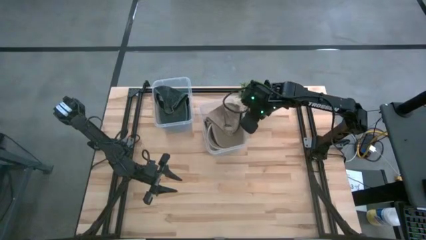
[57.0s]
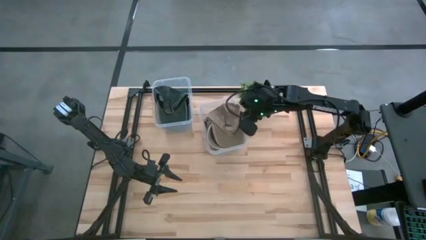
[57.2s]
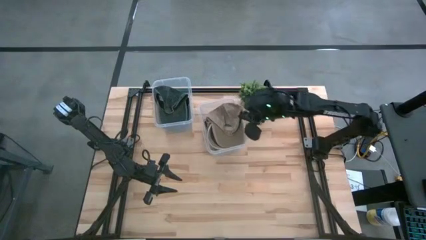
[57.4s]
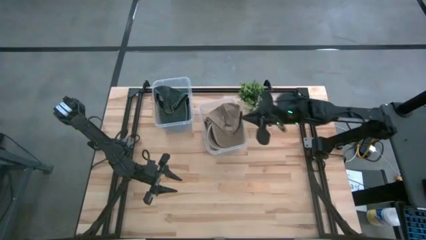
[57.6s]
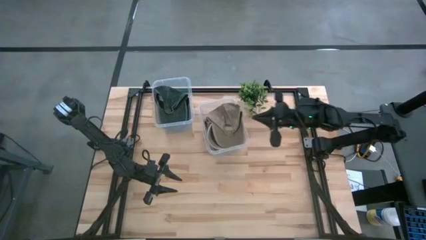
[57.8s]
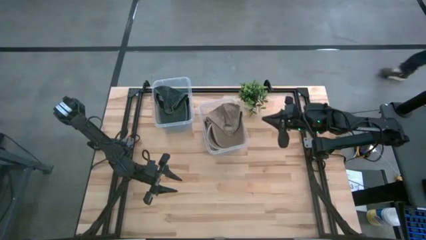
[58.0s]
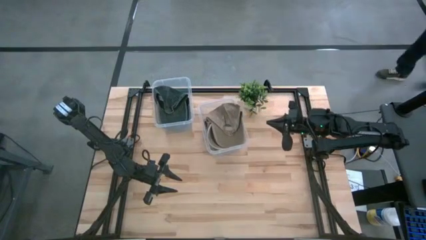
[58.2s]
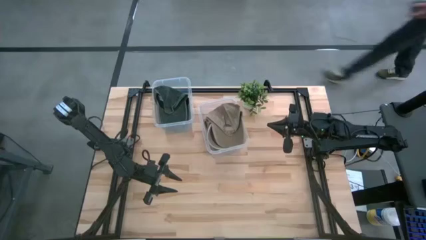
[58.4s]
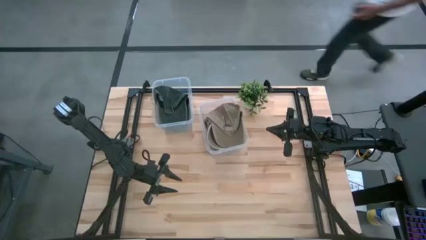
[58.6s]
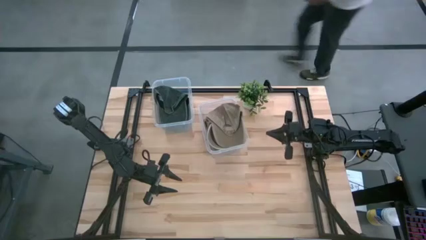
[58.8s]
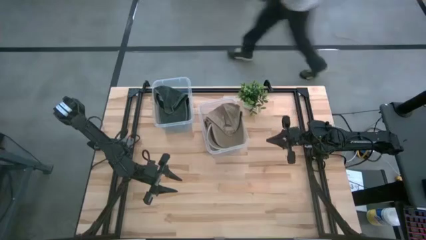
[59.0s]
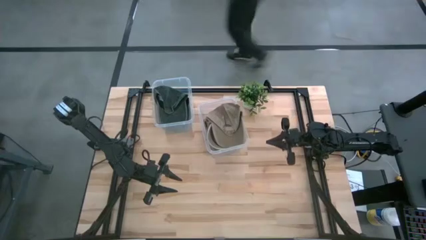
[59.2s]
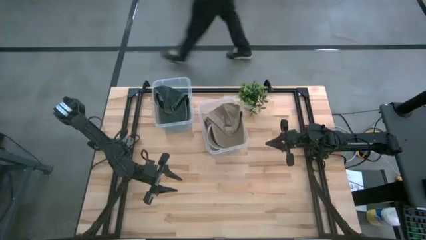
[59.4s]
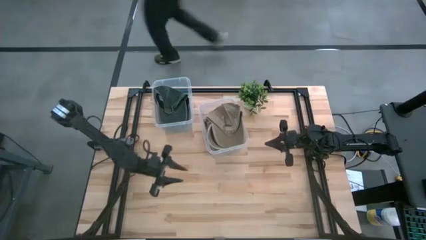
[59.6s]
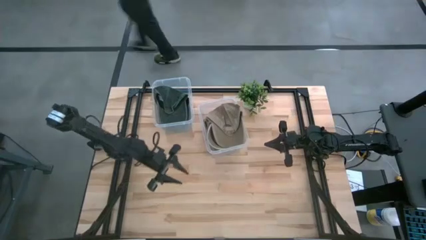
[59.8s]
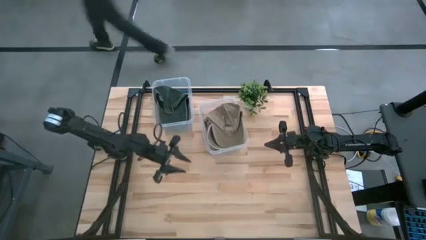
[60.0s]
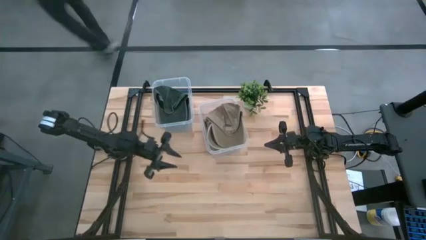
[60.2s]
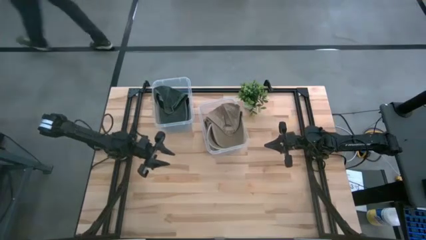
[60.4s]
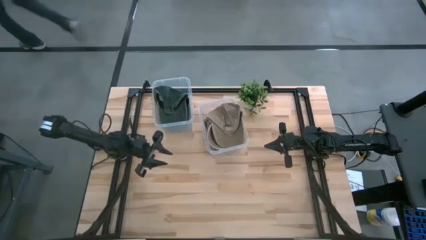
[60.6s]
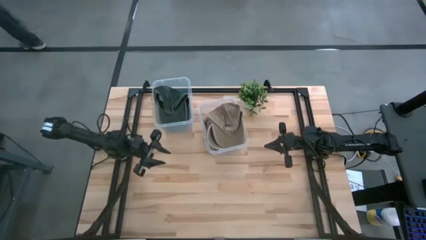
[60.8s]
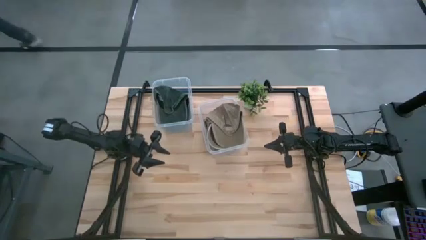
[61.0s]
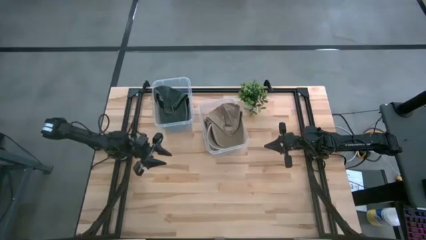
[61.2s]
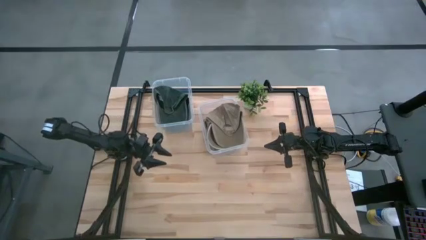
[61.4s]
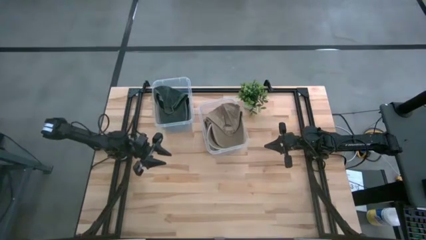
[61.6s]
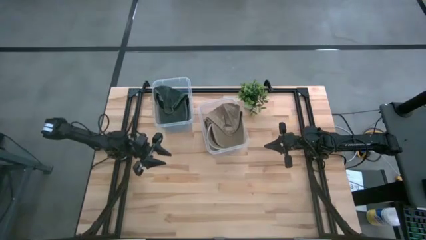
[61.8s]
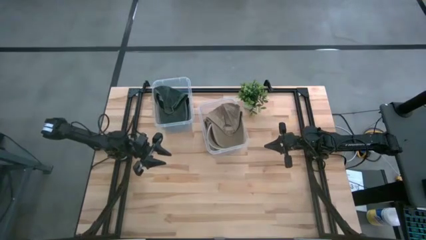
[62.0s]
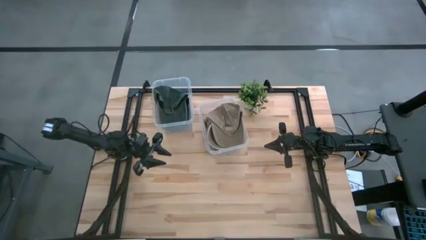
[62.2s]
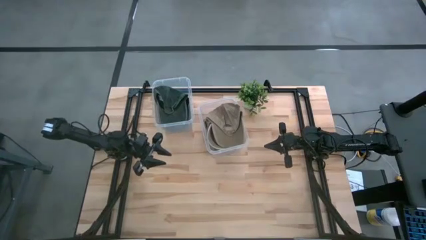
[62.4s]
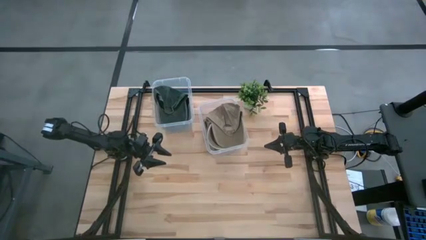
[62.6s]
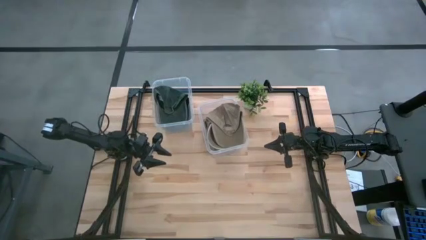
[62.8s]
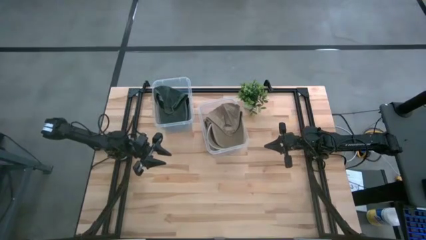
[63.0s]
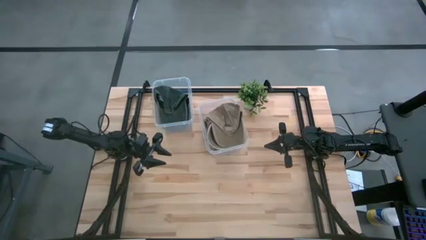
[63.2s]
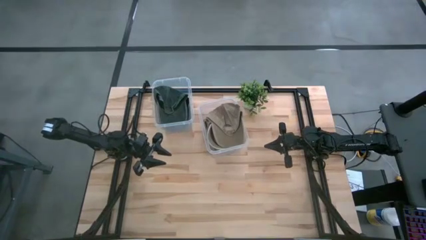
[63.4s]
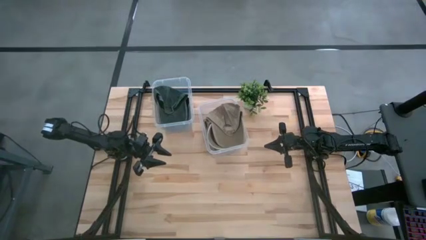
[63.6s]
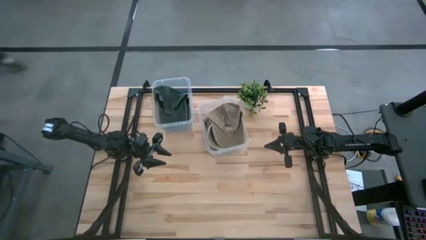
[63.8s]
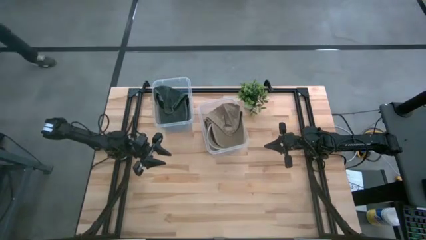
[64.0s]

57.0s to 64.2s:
Task: Pick & Place hat
Return to Home Position

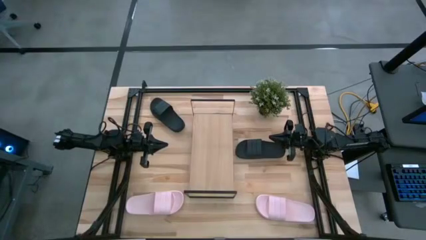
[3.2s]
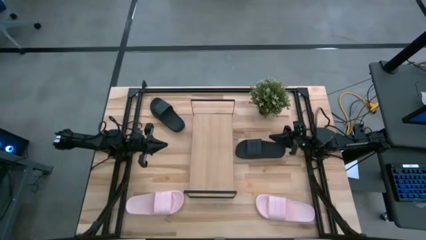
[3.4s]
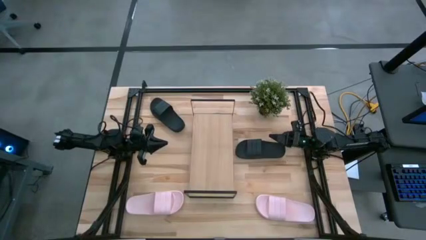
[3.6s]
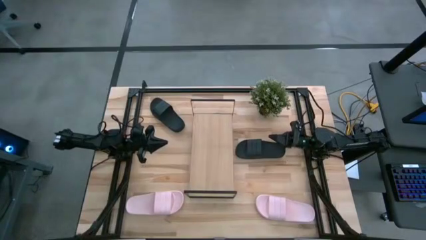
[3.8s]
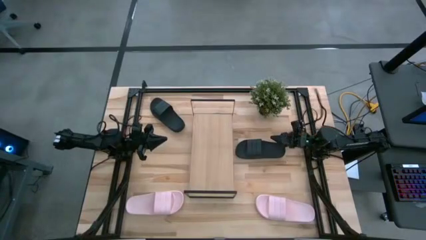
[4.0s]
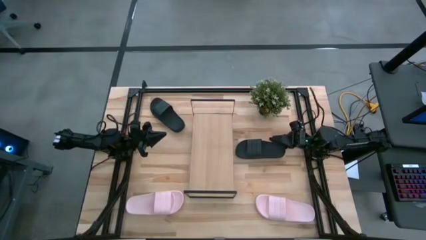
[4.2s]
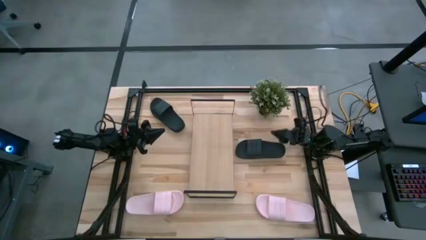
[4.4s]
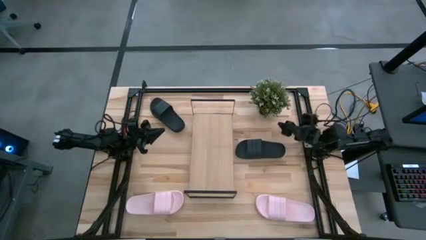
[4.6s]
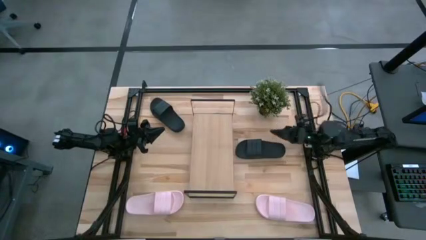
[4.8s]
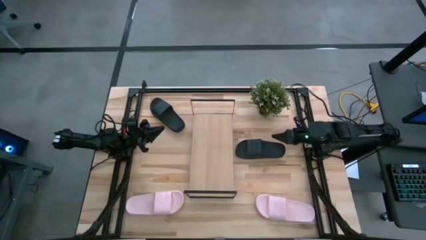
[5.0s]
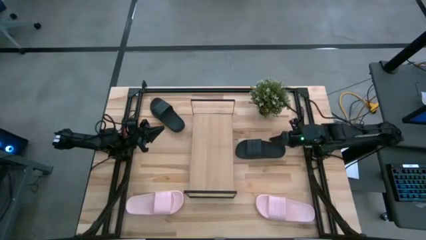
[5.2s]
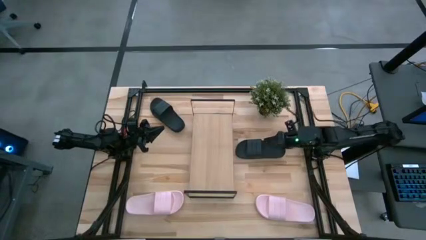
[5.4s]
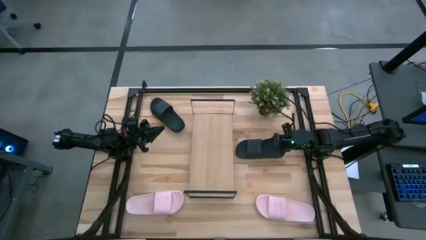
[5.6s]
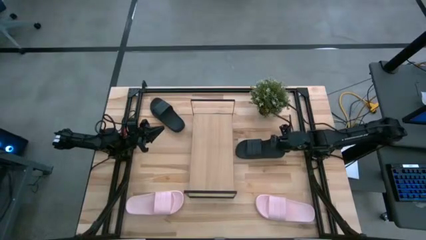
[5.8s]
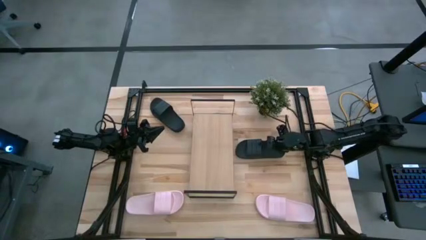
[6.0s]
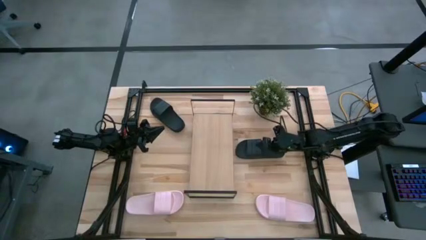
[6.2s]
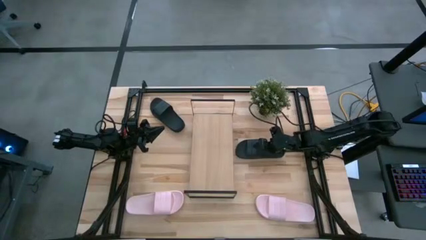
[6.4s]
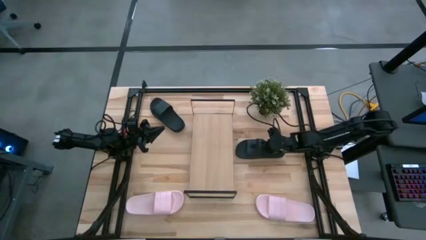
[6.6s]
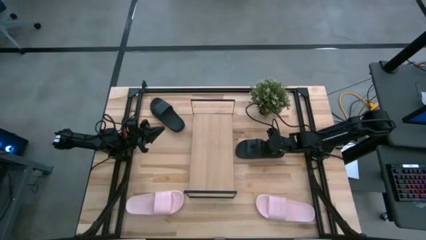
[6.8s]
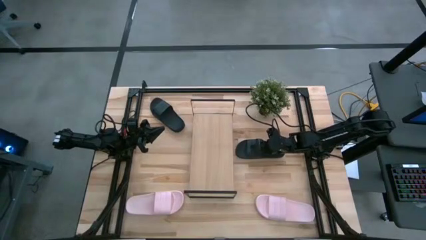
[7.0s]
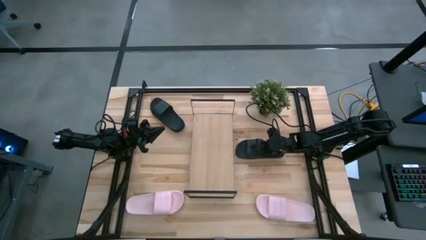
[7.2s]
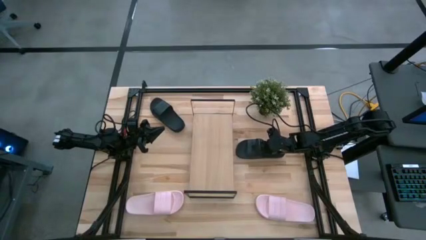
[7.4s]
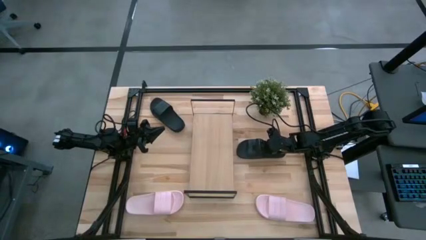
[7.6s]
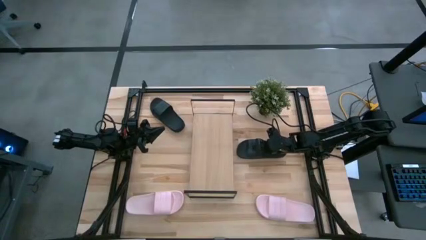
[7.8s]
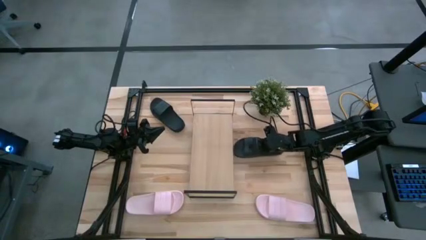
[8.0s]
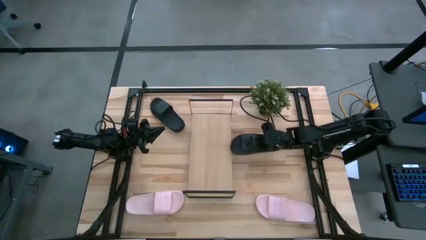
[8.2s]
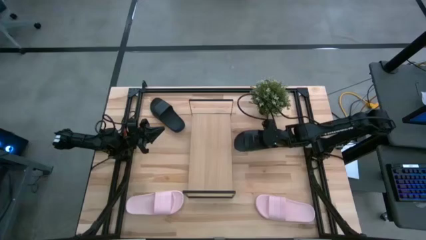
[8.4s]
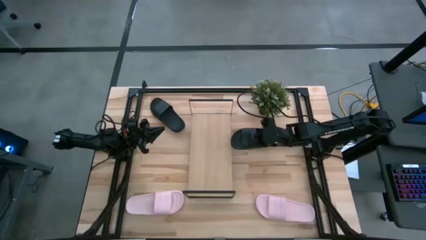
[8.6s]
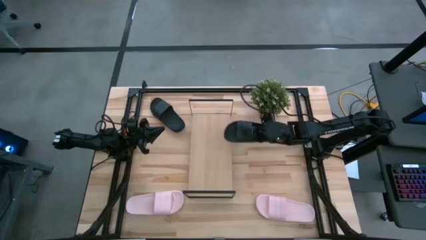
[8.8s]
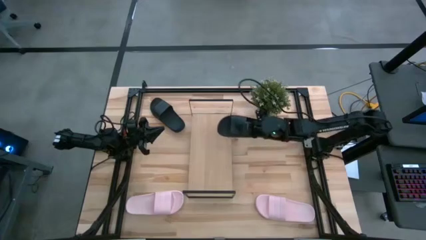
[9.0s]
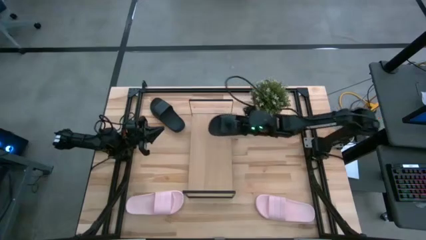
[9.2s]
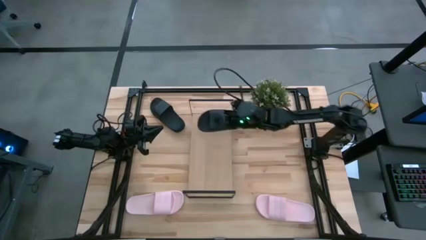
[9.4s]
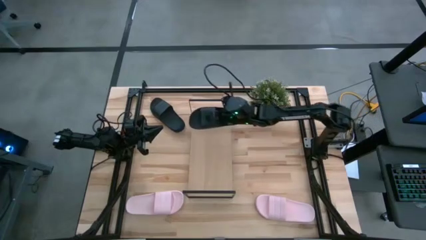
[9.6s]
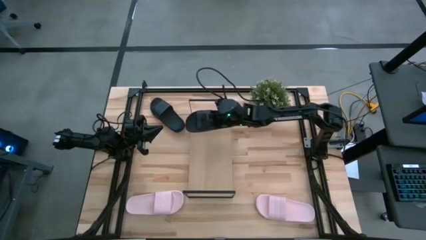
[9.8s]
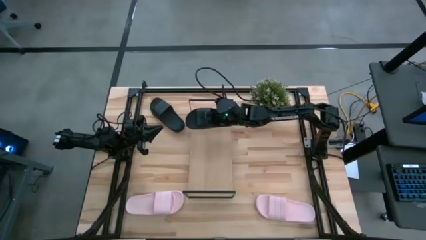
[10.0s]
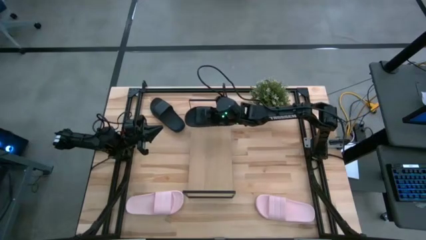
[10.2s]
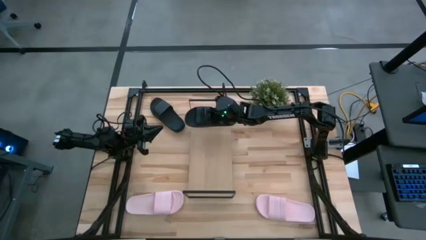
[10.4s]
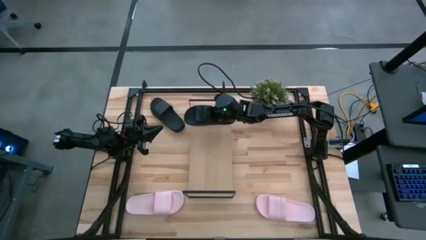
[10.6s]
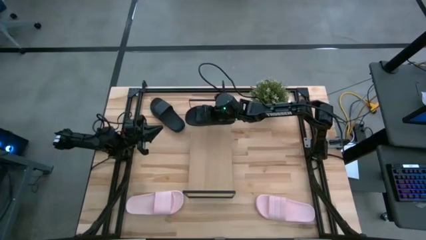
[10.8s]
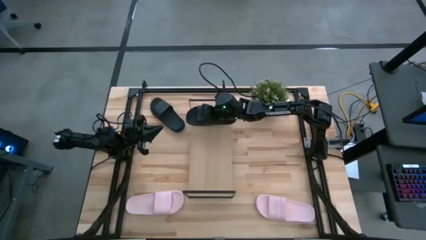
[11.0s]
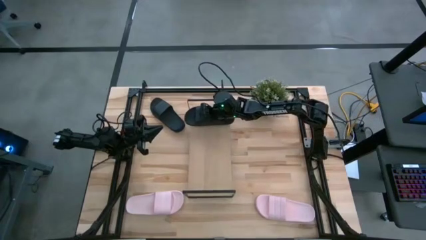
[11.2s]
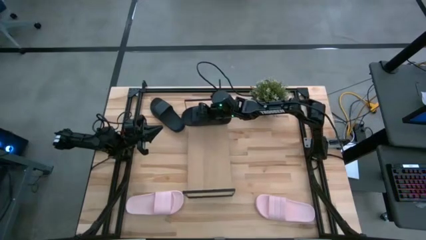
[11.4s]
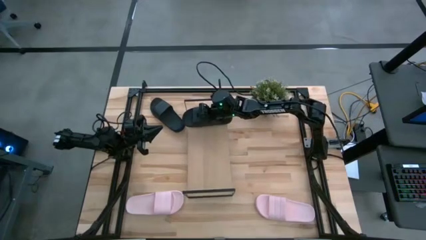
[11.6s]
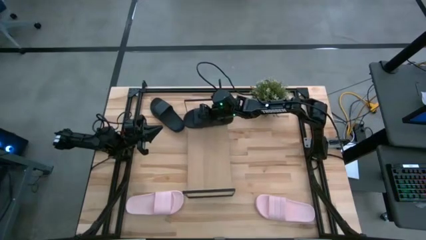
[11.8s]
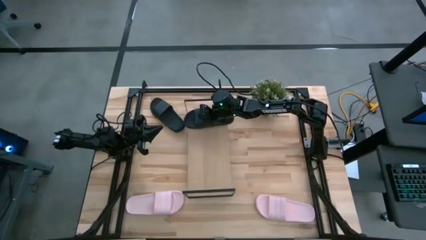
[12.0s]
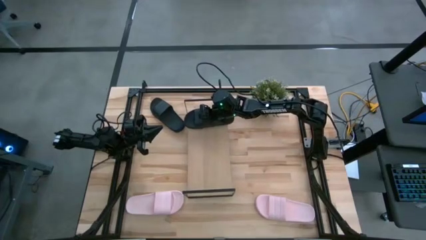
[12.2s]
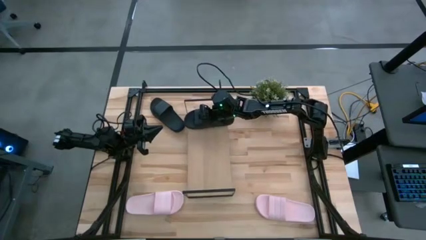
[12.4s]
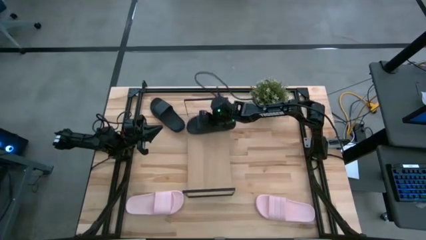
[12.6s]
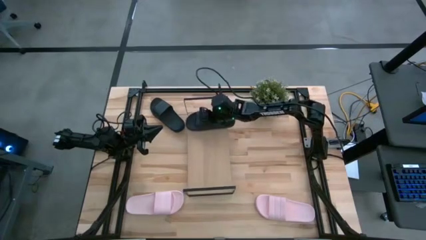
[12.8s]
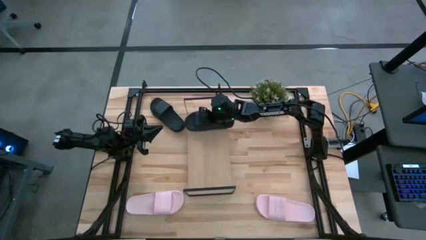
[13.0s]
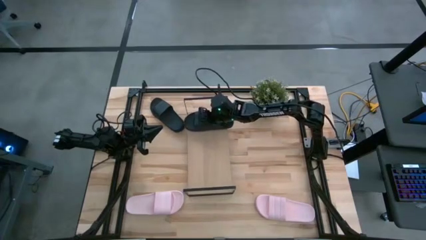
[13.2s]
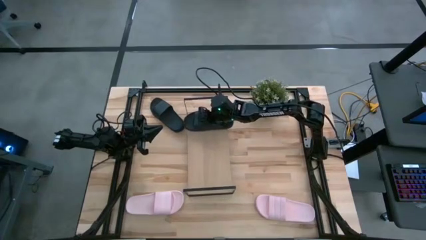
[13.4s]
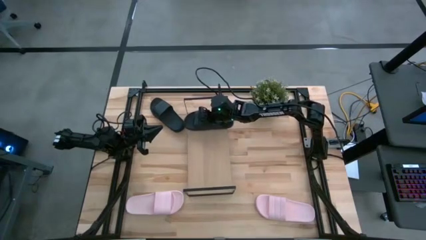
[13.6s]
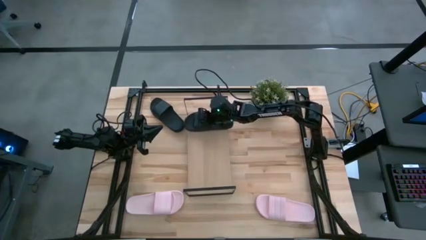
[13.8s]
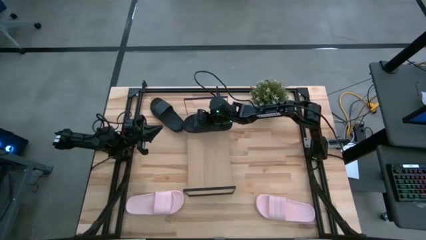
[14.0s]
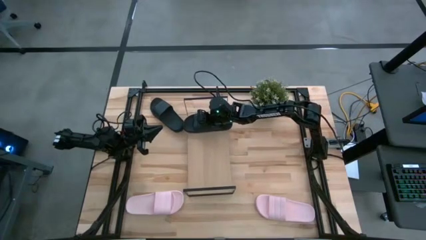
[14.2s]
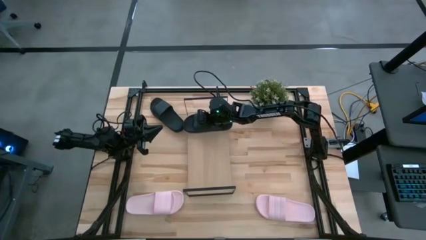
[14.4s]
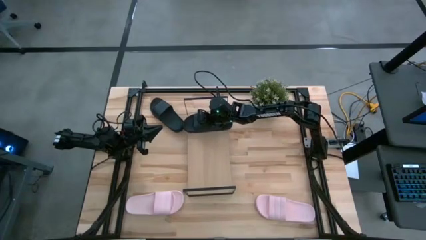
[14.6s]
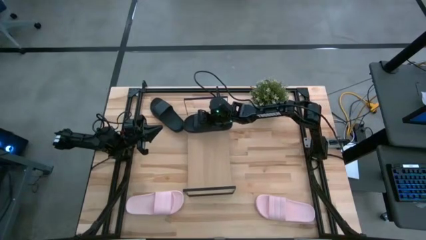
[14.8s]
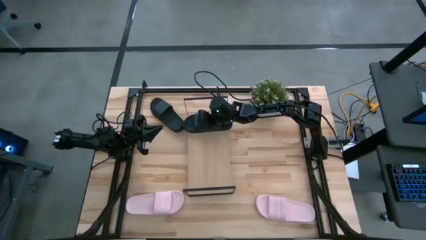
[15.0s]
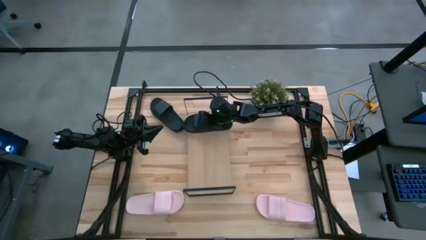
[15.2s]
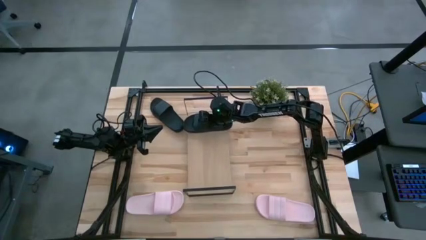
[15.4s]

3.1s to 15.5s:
Task: Pick and place slides into the shelf
Put the right black slide on the shelf
